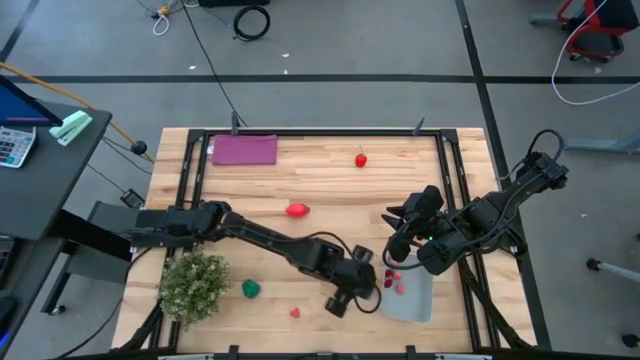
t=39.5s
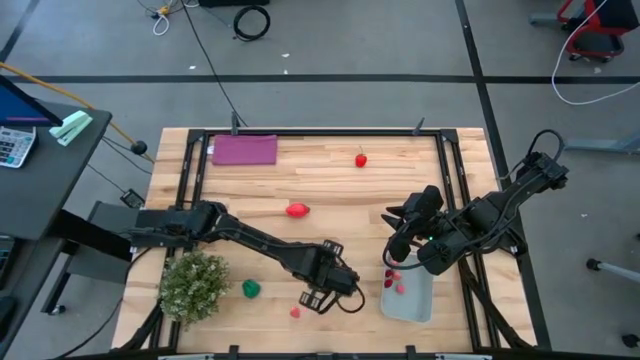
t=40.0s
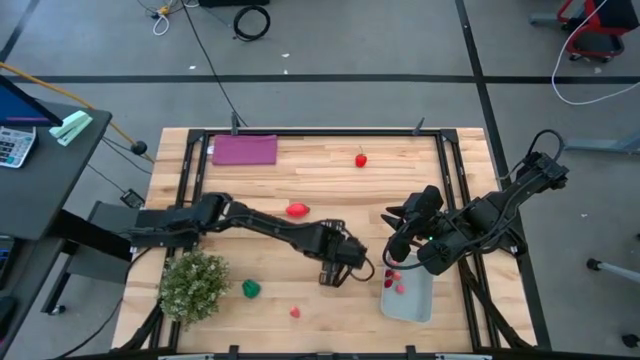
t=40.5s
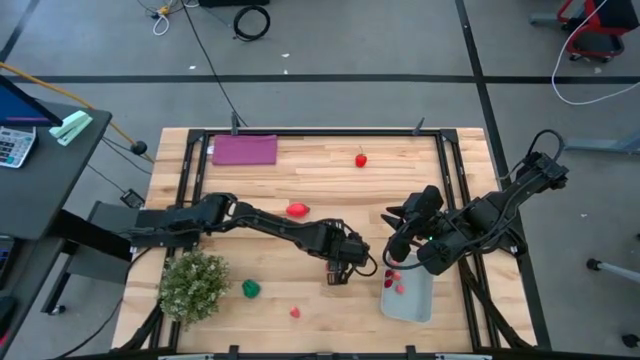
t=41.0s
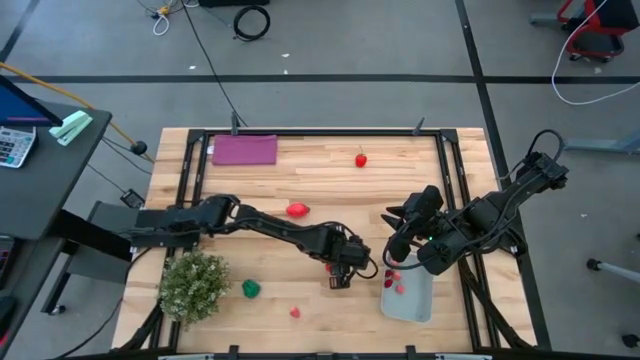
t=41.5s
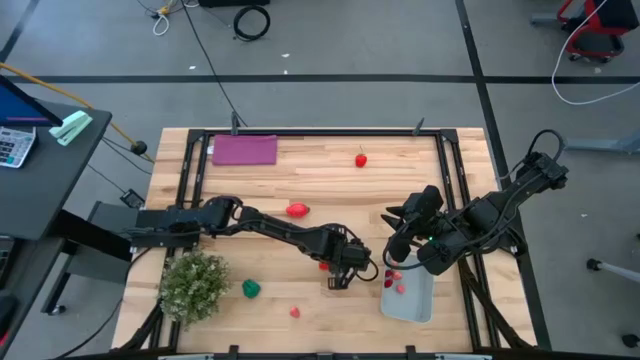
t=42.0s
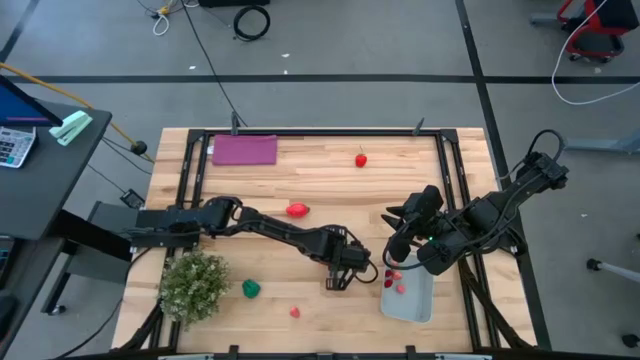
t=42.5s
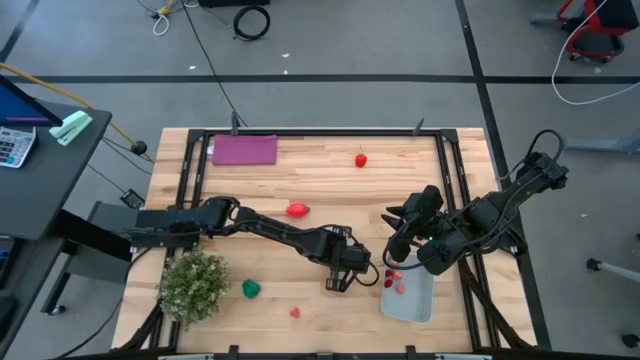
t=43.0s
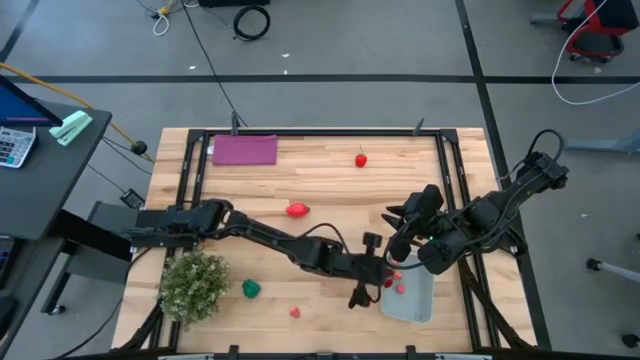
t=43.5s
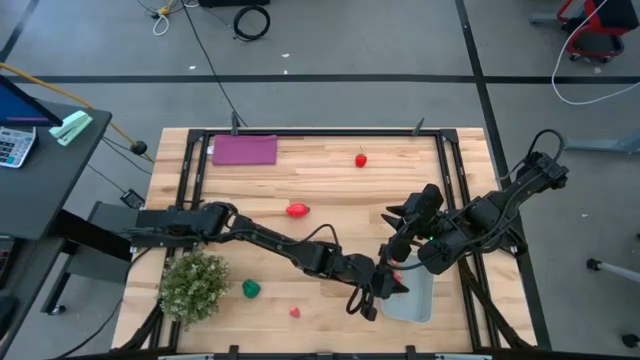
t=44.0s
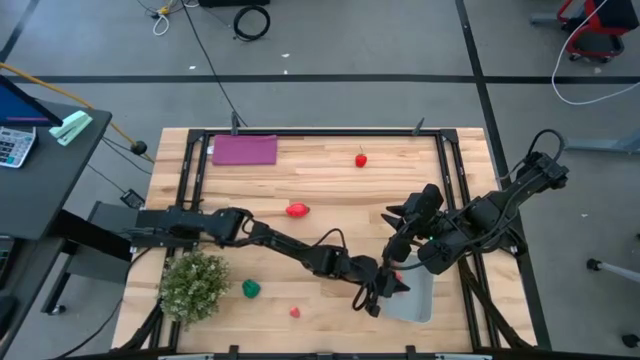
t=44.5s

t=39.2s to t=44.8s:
Task: Pick and placing Produce into tupperware
Put the red strawberry into the gray bin

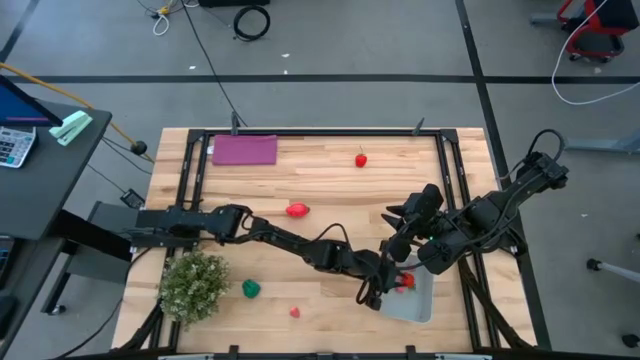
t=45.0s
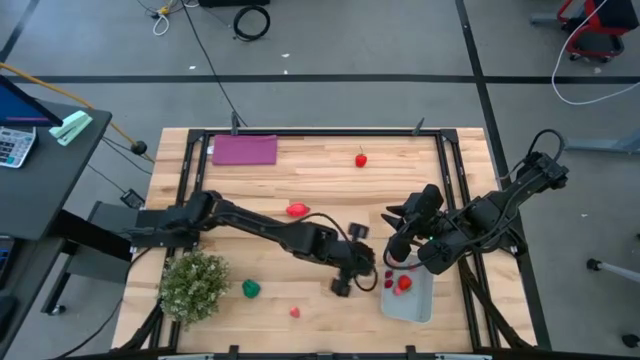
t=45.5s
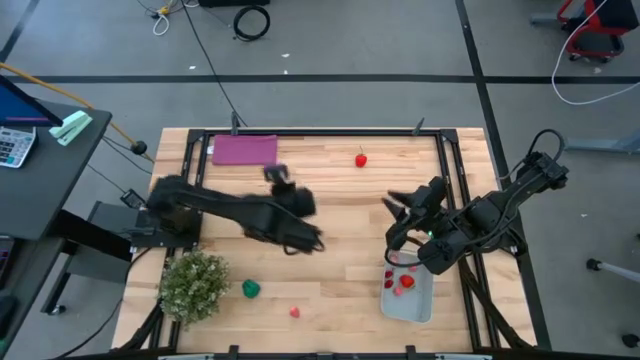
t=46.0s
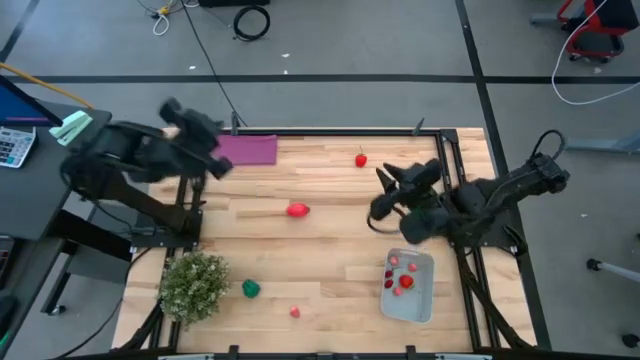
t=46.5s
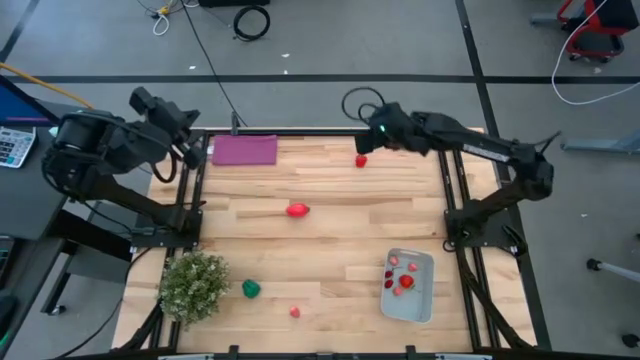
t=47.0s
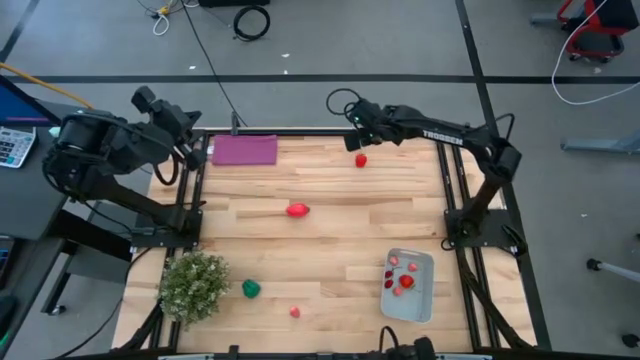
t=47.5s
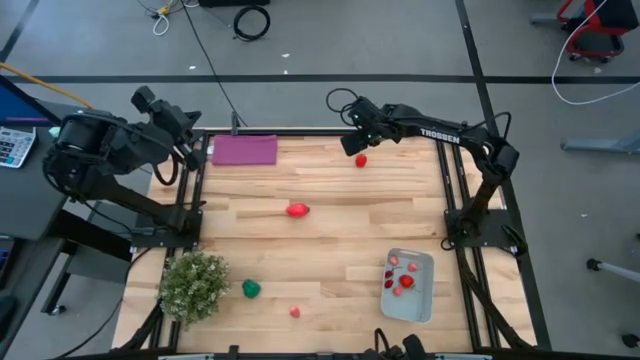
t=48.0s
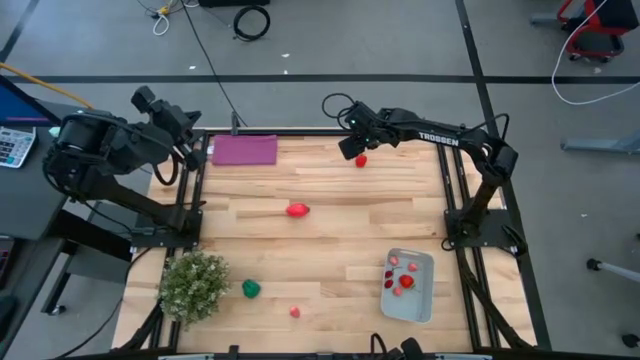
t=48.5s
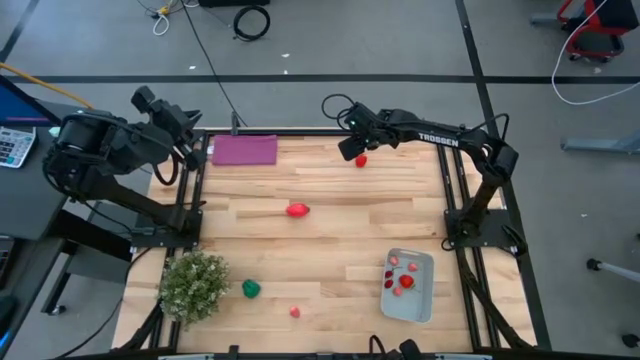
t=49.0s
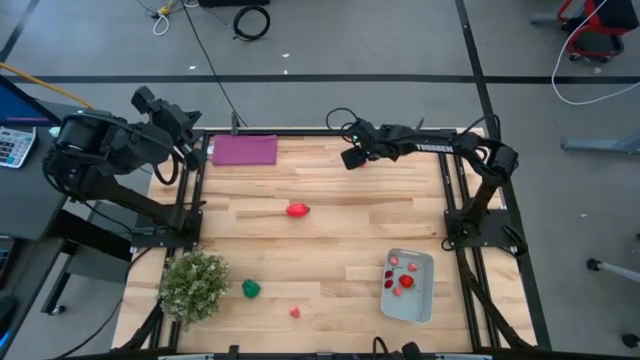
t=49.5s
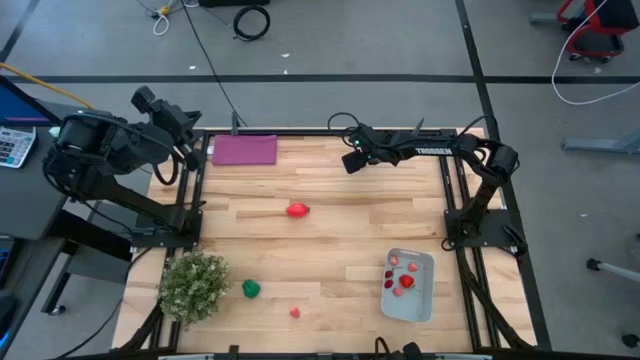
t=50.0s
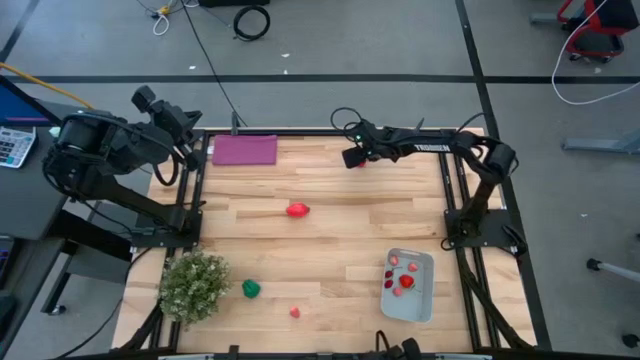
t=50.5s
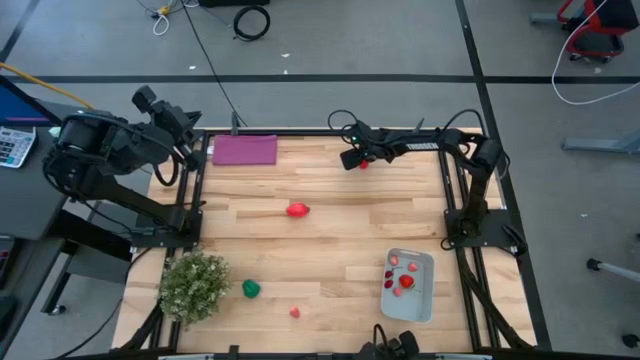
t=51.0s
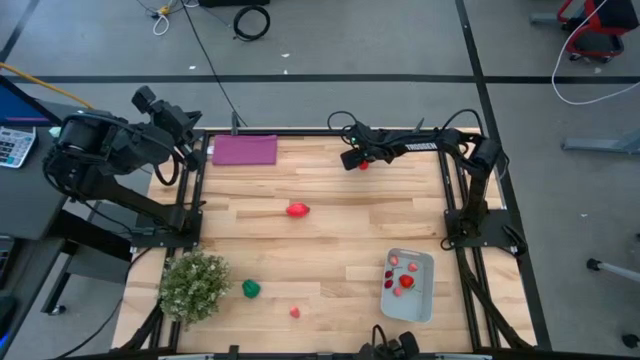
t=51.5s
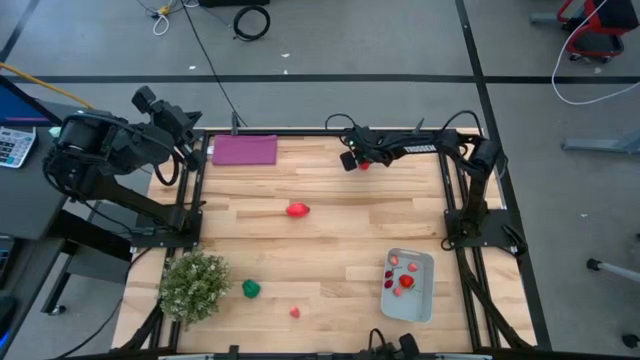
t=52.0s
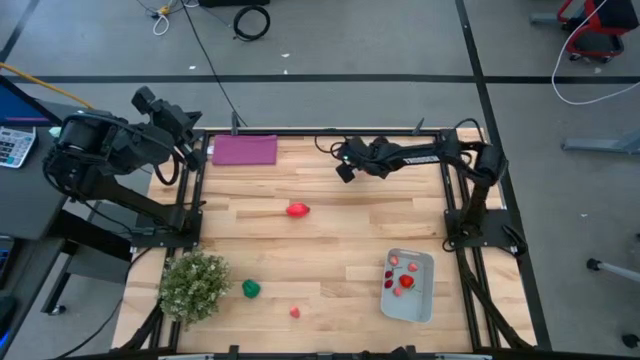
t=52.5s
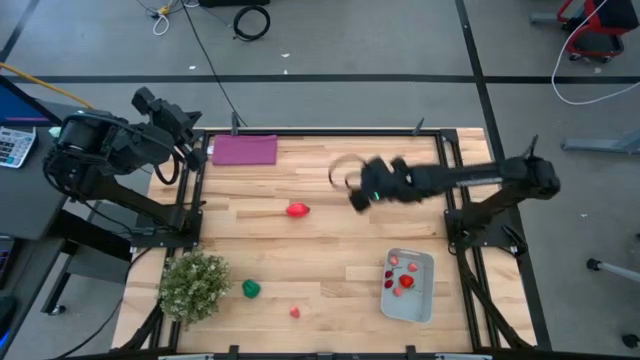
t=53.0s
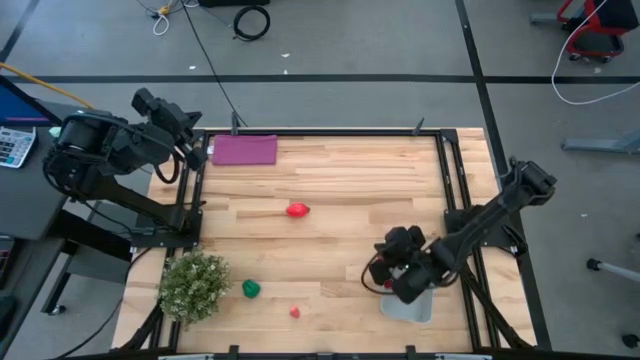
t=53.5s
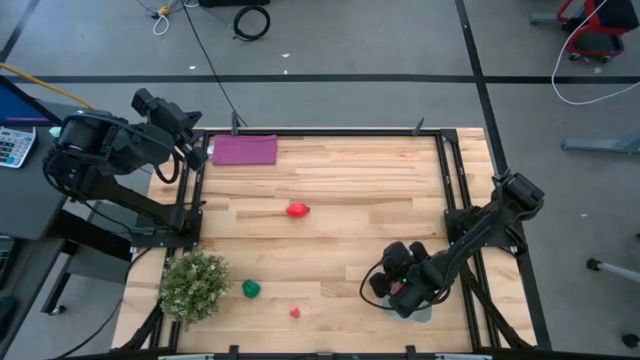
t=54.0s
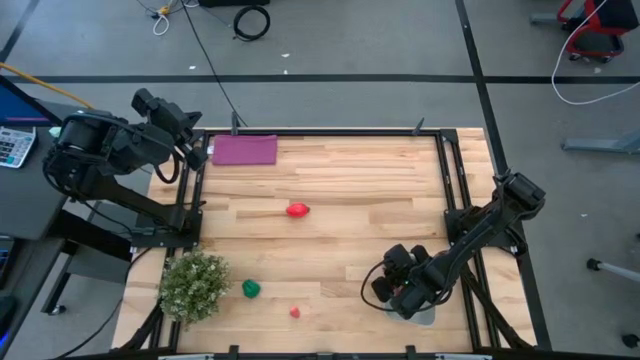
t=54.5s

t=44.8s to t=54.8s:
Put the red strawberry into the gray bin

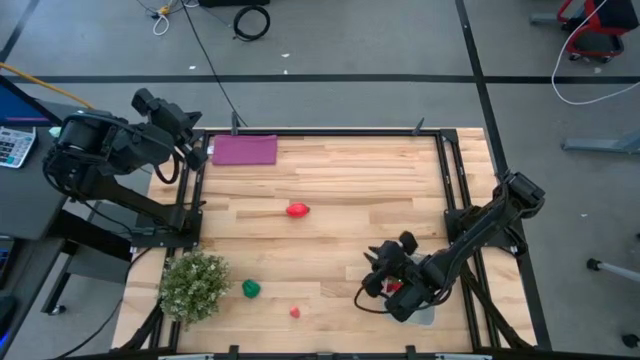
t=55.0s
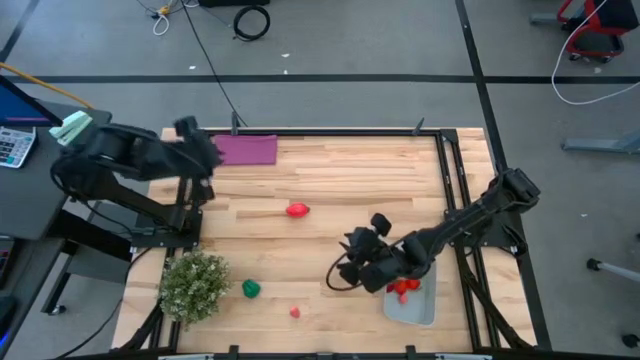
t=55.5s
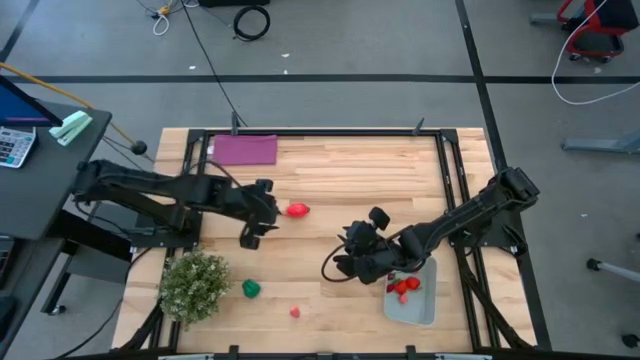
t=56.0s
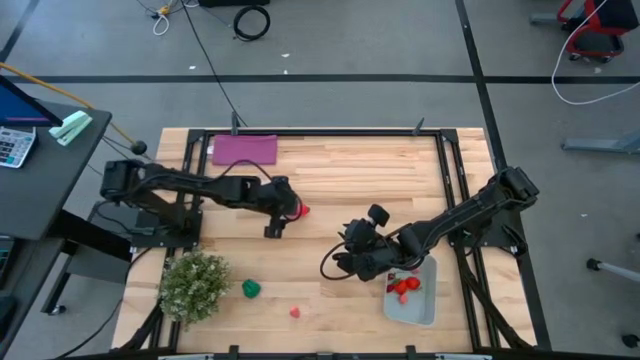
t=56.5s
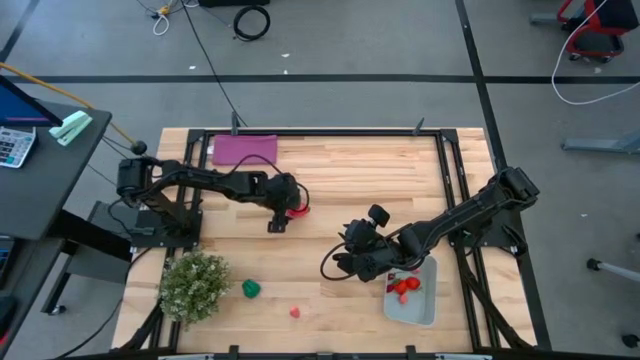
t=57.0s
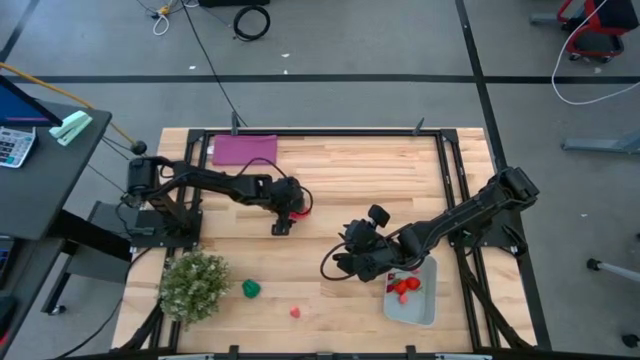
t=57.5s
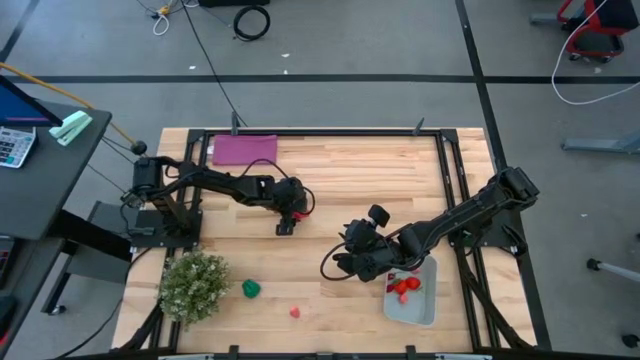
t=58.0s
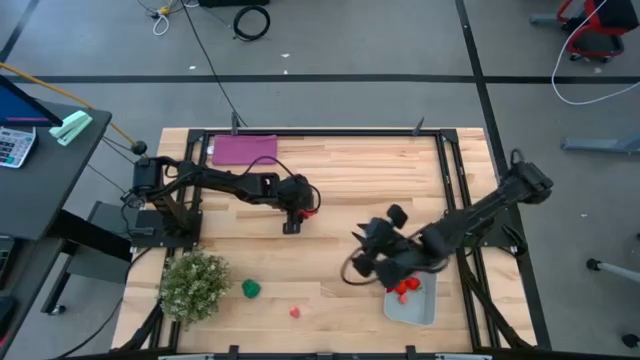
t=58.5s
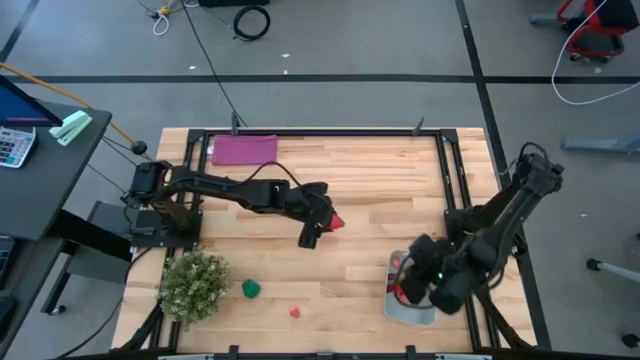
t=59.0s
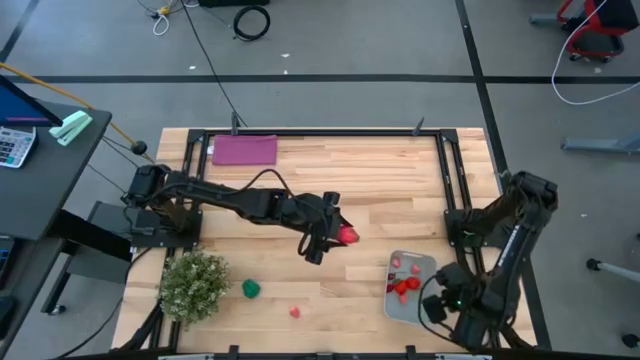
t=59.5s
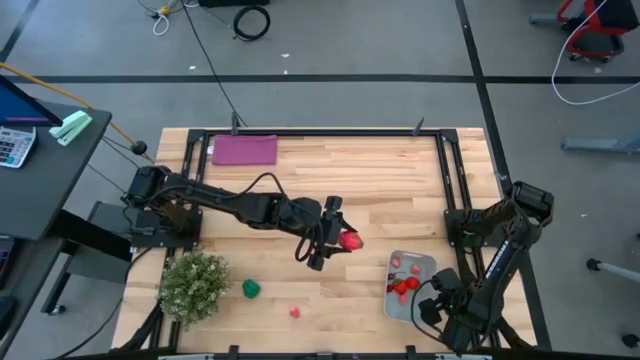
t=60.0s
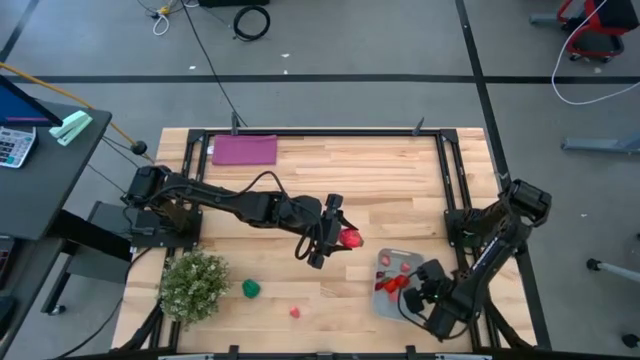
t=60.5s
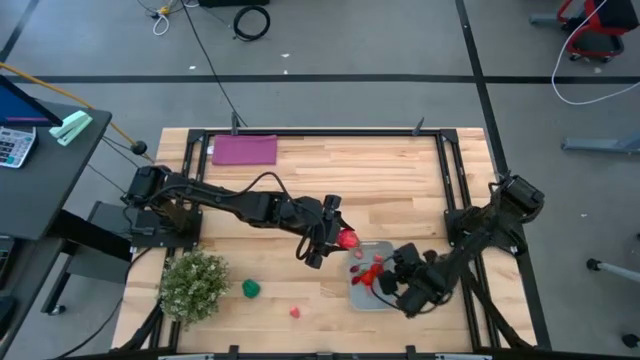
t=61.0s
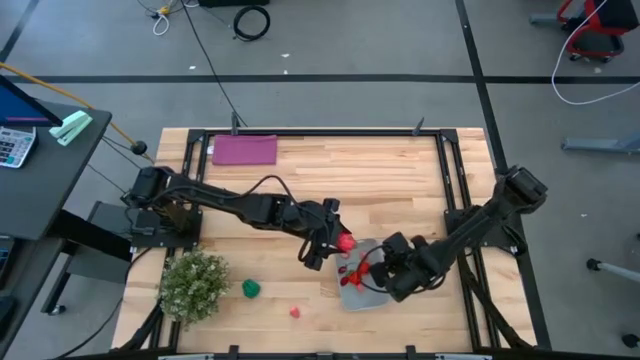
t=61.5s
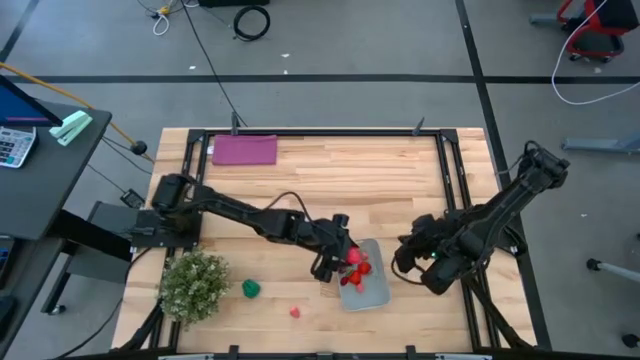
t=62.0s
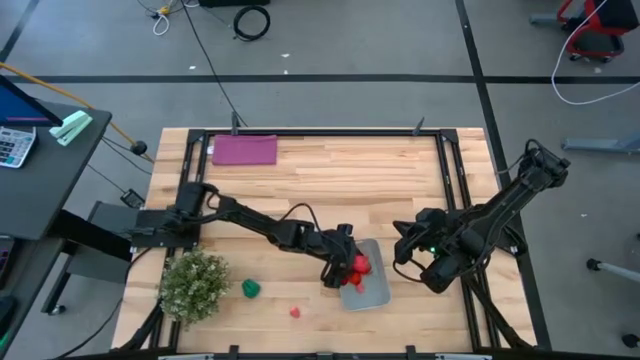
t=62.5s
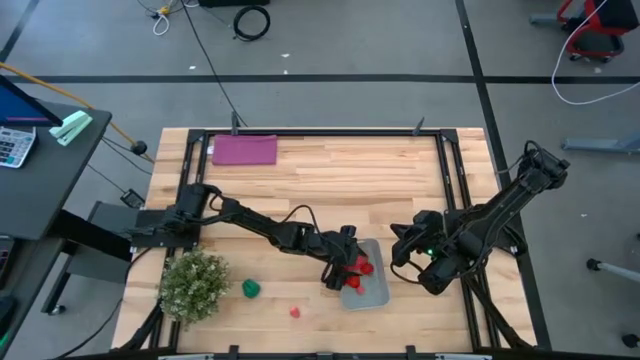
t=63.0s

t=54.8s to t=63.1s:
Put the red dragon fruit into the gray bin
